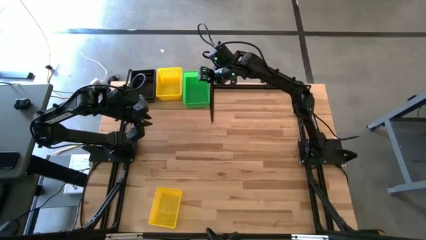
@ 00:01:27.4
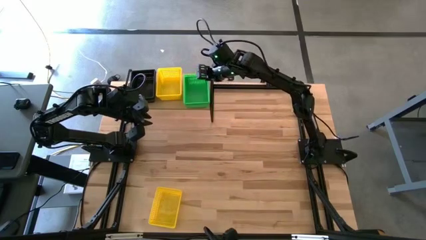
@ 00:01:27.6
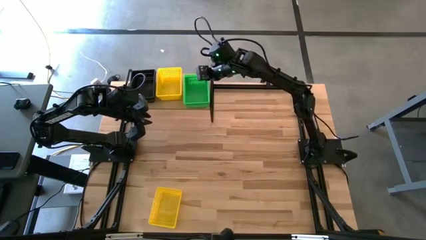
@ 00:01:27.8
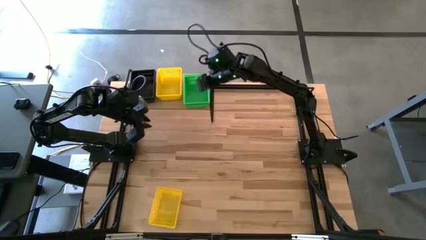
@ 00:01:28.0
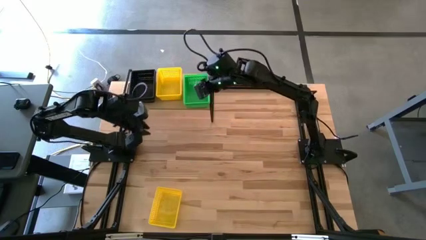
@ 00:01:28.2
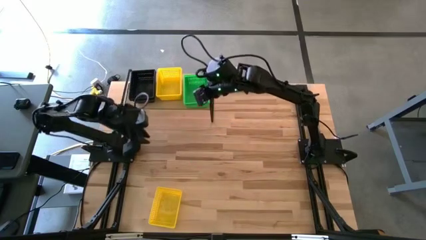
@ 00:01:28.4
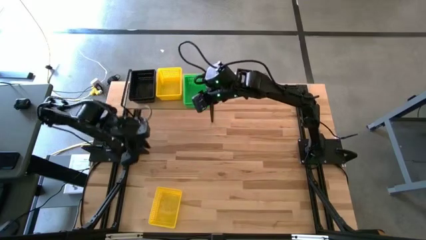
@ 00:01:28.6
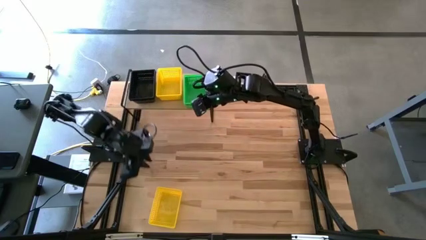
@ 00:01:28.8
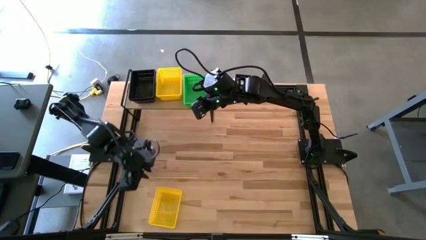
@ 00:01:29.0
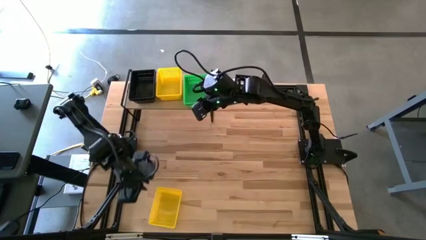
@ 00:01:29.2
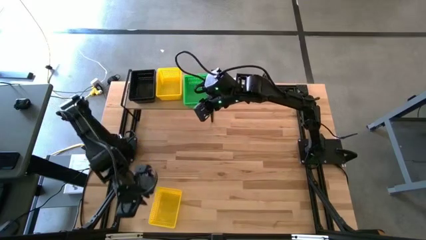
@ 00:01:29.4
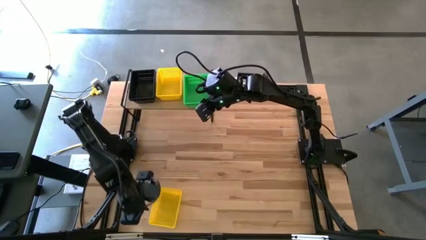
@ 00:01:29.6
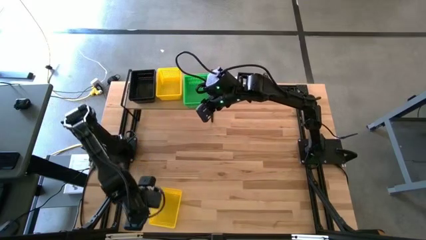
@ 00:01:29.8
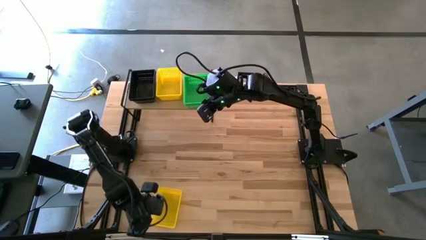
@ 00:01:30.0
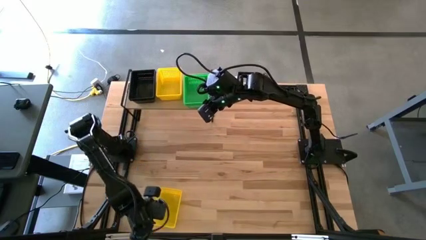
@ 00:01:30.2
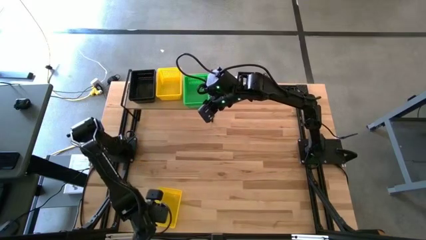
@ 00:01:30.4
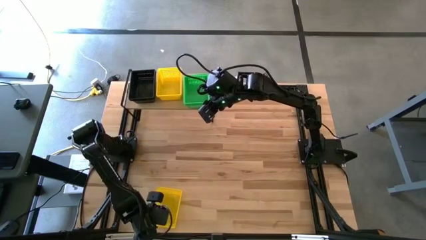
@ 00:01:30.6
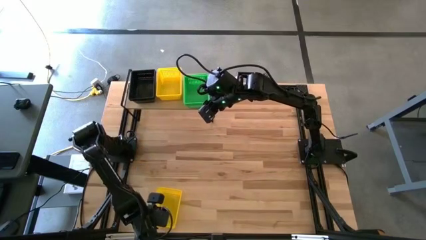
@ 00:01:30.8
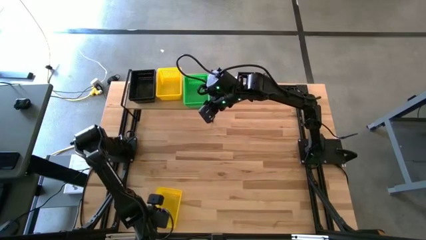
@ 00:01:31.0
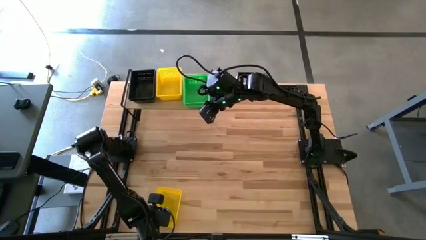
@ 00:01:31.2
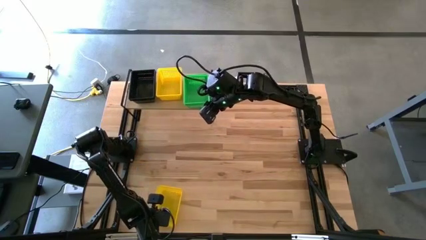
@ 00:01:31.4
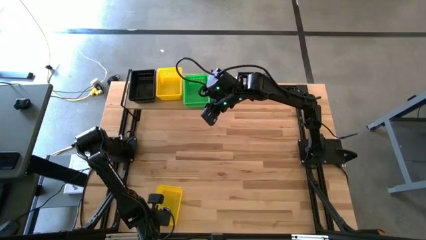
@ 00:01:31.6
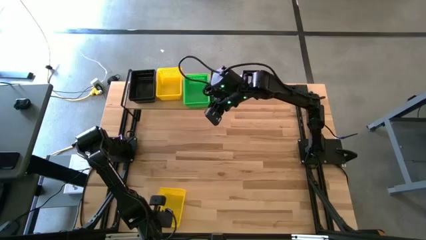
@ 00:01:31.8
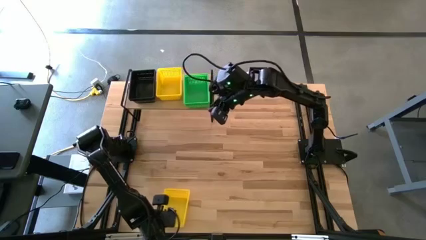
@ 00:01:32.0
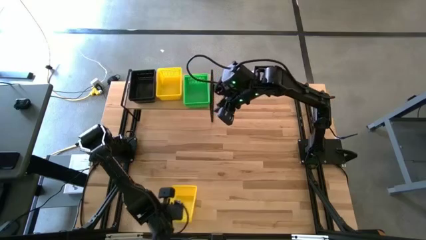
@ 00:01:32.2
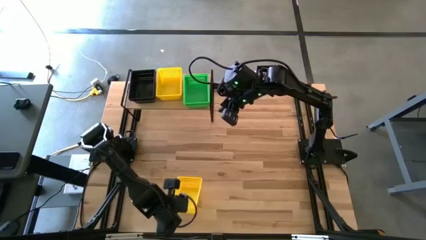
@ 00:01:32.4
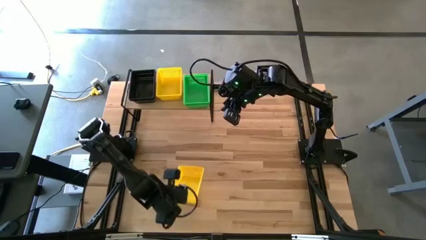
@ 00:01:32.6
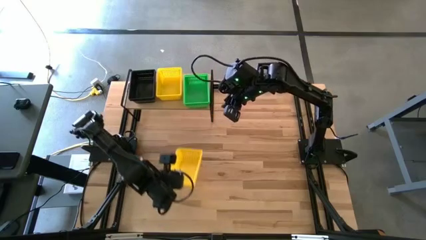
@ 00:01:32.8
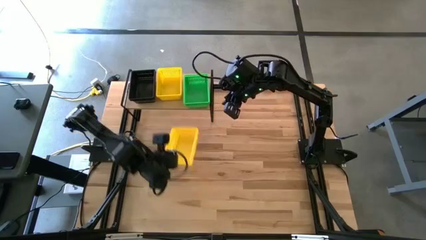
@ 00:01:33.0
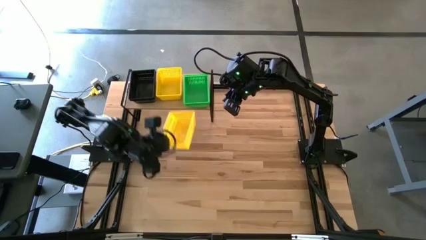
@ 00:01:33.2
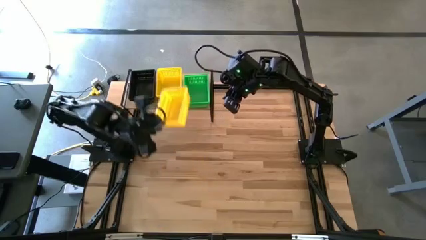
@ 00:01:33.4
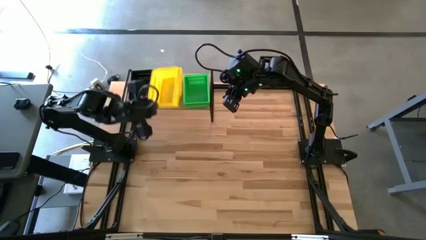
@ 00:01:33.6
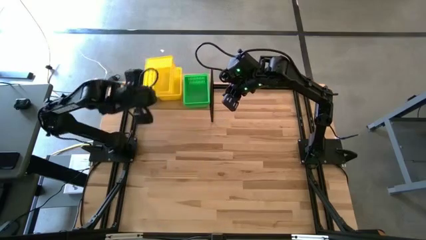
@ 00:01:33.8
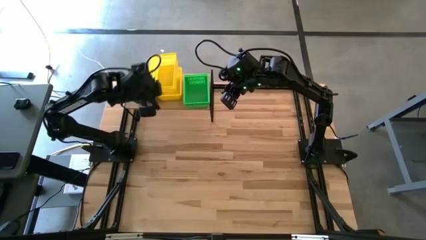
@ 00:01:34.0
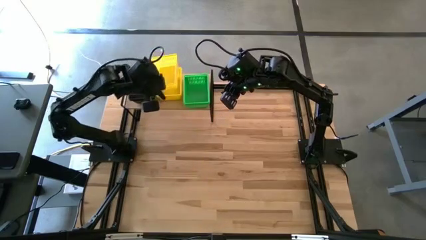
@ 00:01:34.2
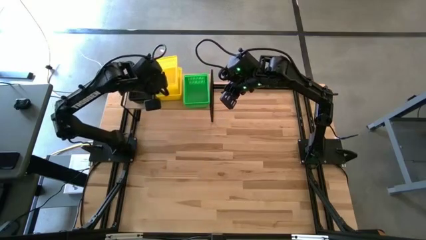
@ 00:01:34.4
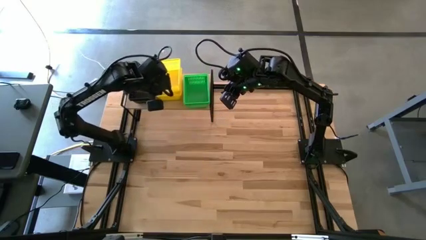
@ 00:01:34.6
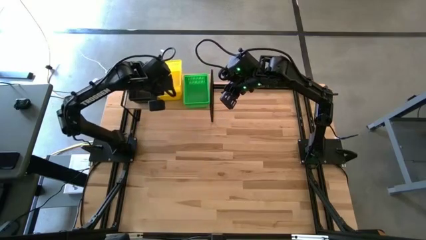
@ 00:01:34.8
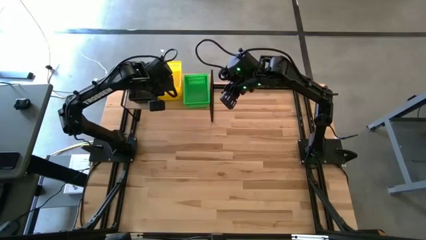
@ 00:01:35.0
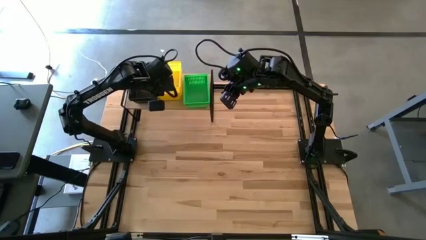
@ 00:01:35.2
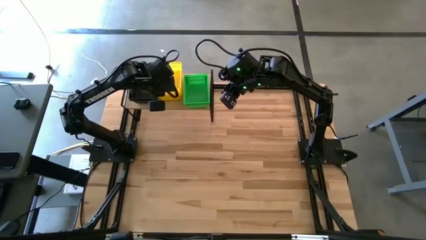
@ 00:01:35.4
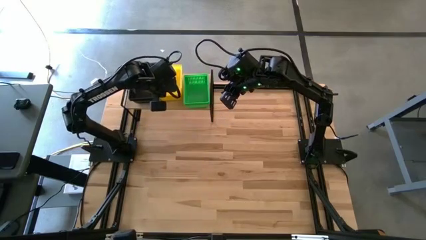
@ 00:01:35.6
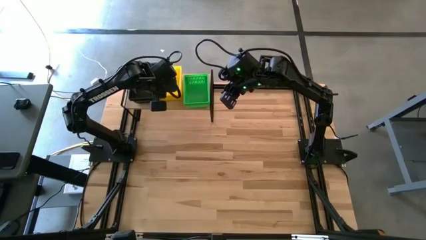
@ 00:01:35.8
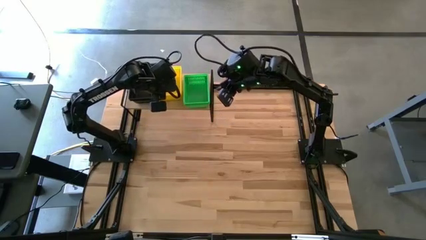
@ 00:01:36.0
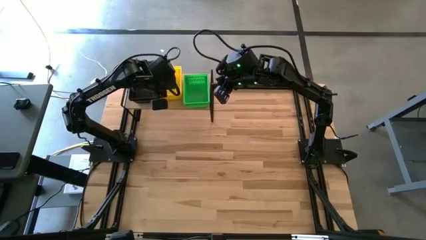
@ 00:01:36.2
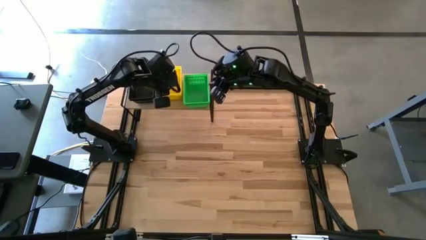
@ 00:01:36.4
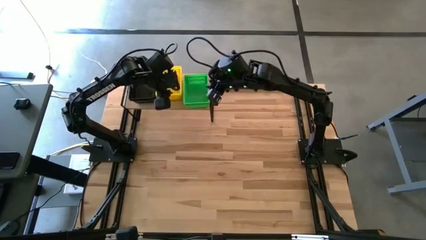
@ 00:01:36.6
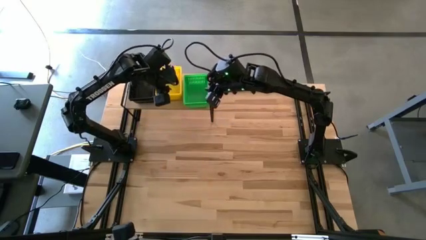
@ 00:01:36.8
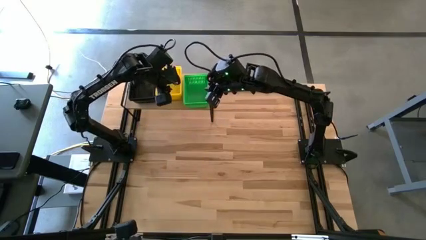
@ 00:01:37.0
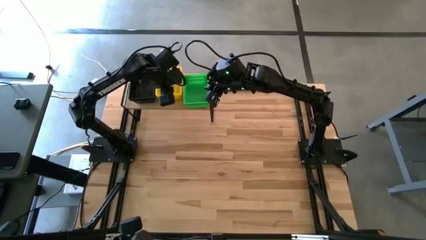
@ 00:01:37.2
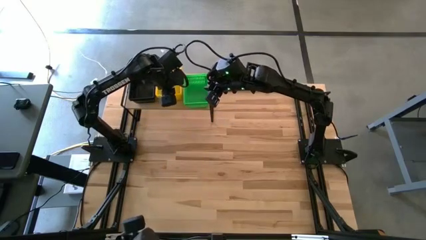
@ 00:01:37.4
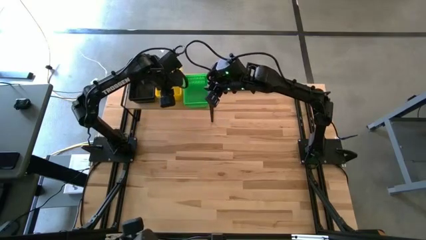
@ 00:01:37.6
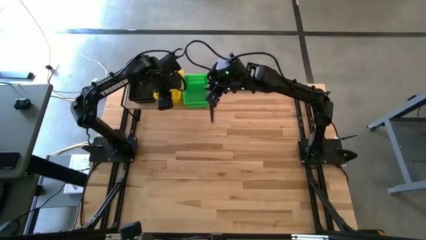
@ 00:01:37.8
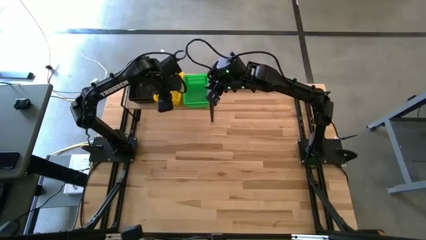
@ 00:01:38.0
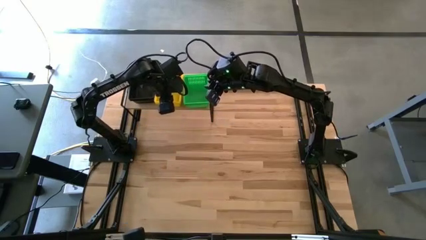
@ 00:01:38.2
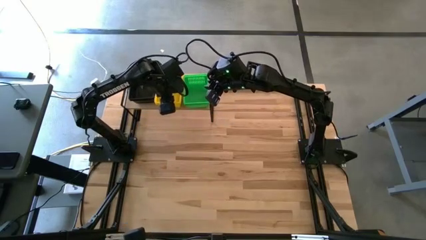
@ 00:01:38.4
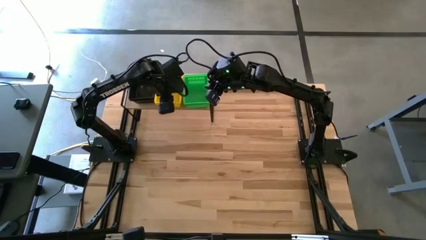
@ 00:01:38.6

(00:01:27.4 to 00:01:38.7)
Task: Stack baskets on shelf by color
Stack the yellow basket on top of the yellow baskets on the shelf

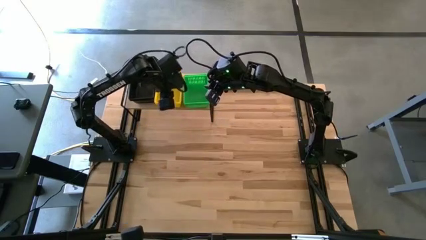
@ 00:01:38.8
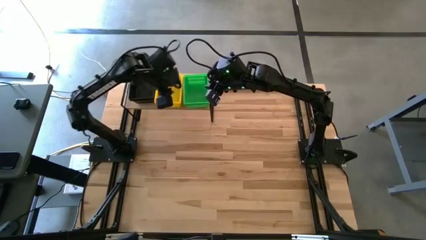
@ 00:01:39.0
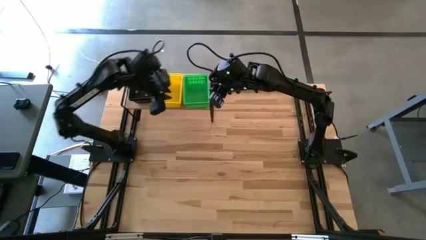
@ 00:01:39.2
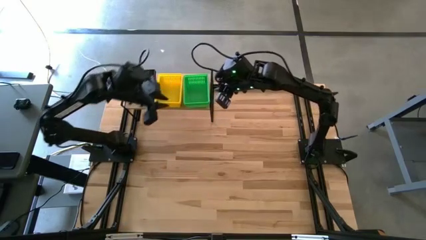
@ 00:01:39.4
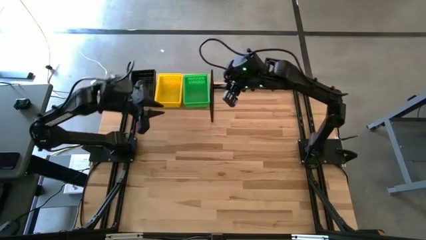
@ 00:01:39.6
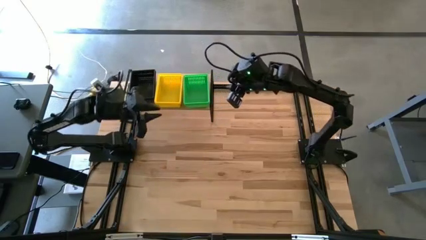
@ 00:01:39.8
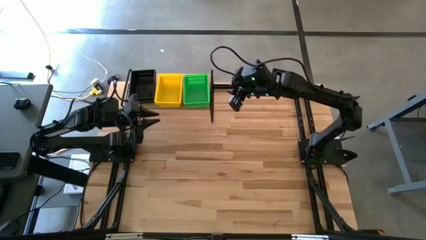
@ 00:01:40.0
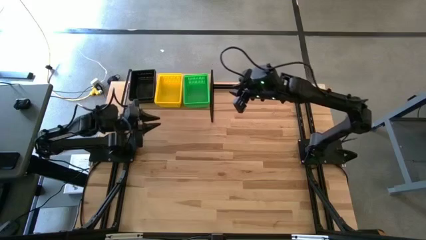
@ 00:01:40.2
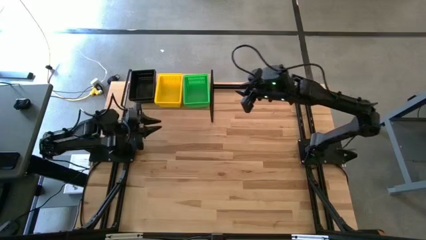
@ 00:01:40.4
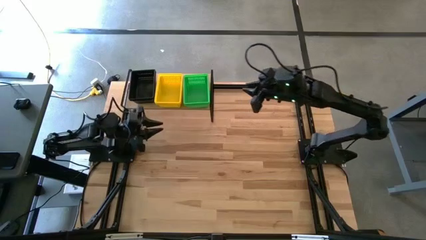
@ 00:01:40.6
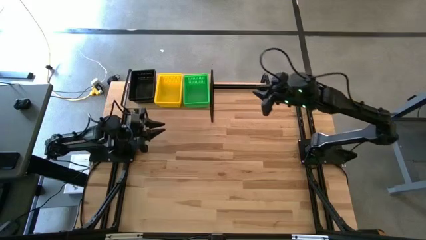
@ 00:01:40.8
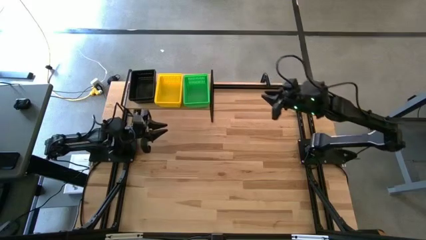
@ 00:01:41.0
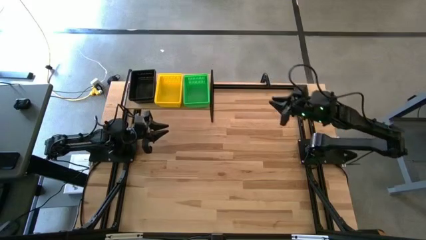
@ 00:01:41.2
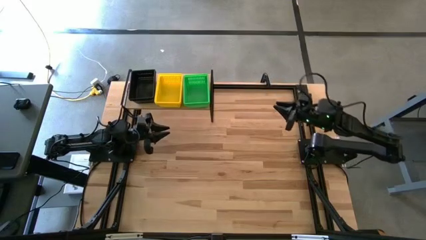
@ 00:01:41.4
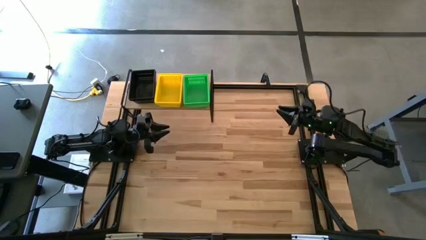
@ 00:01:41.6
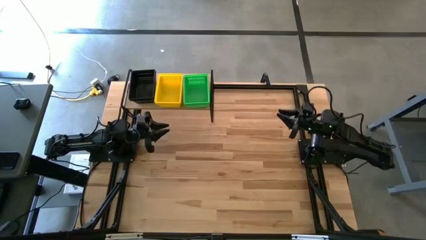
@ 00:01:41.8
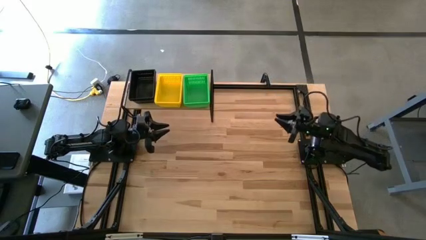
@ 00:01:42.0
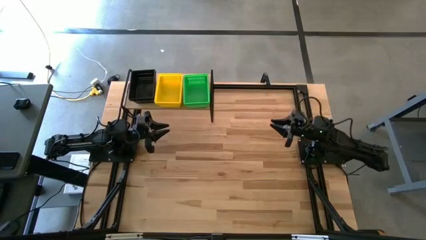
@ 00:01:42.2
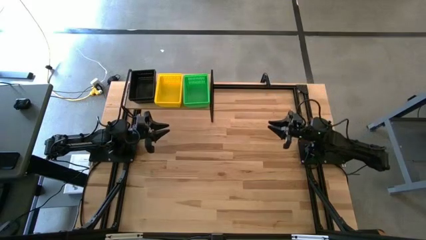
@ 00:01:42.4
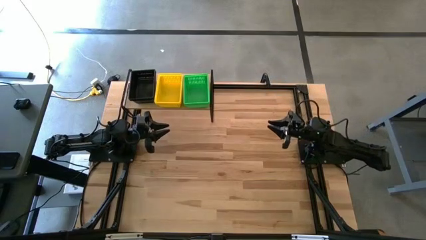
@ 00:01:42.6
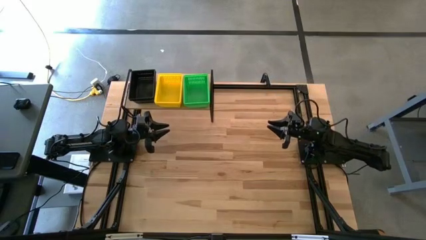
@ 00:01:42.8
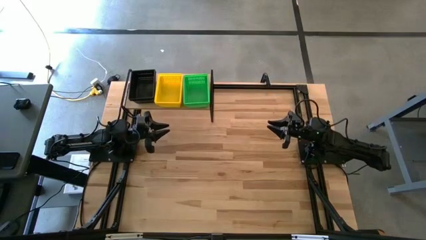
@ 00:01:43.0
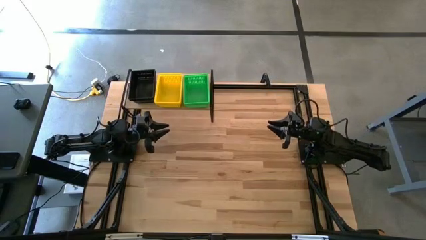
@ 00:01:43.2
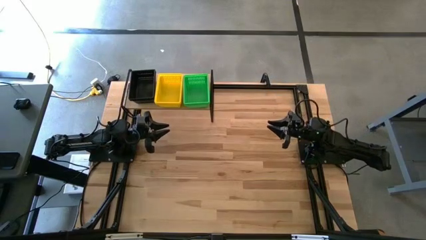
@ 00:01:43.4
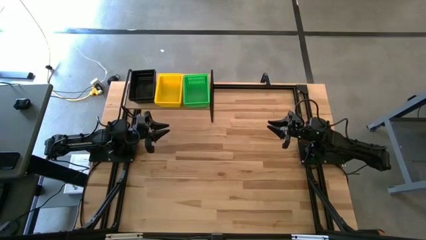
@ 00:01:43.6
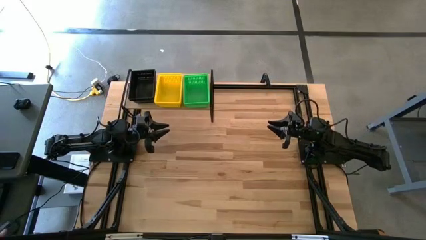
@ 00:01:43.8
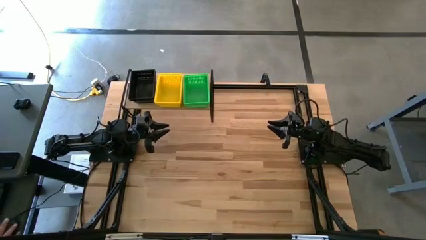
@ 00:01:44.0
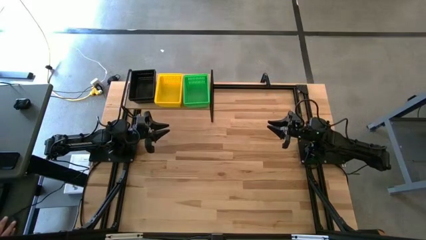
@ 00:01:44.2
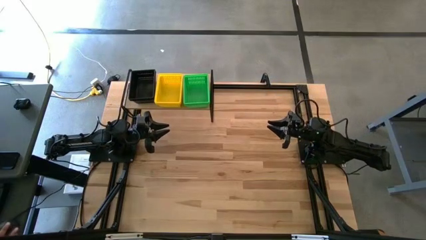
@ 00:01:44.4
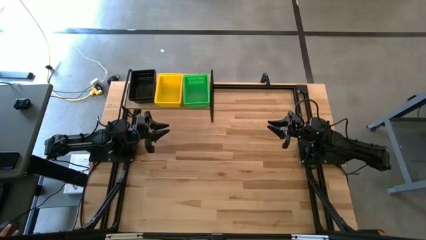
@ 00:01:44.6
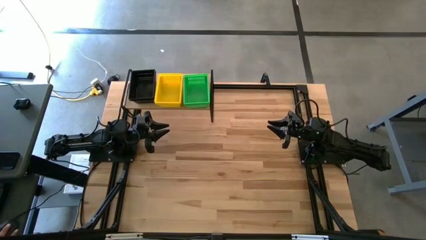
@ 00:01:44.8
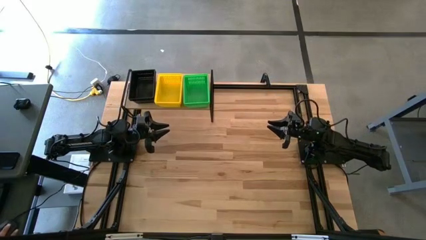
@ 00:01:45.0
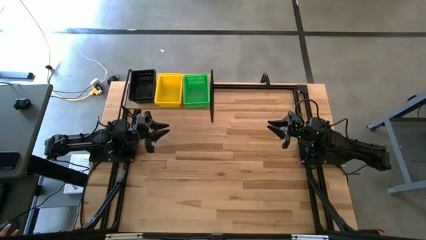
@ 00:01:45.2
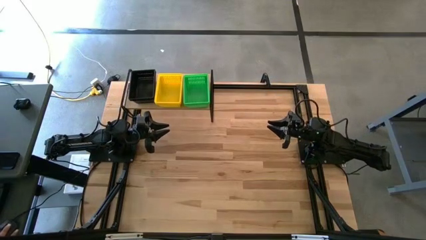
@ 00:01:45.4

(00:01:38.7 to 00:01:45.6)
Return to Home Position
